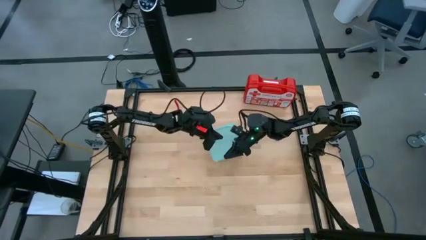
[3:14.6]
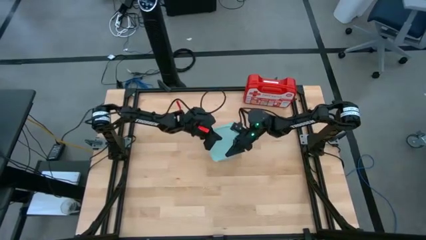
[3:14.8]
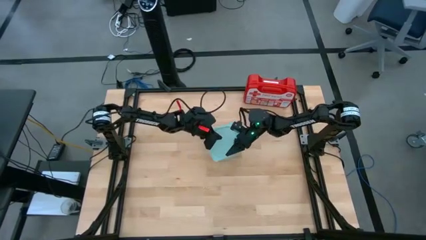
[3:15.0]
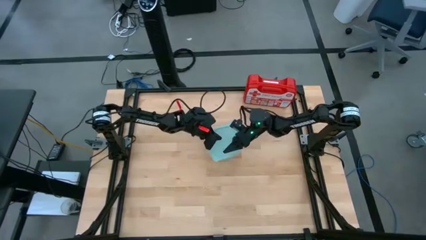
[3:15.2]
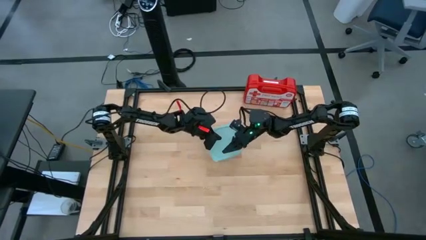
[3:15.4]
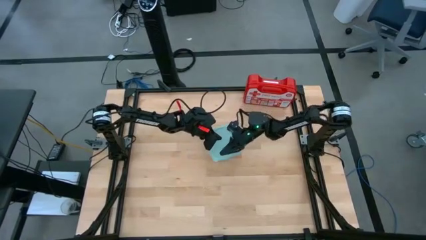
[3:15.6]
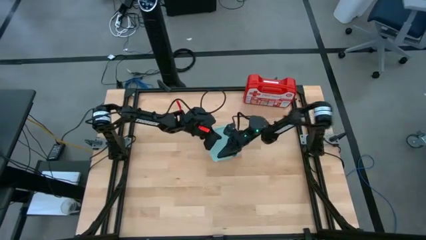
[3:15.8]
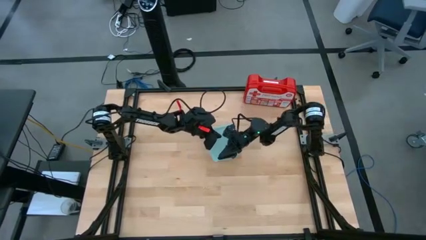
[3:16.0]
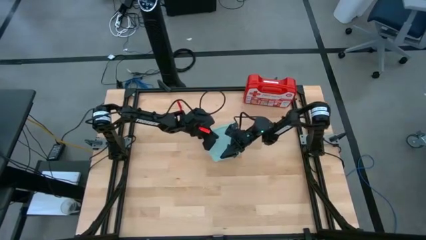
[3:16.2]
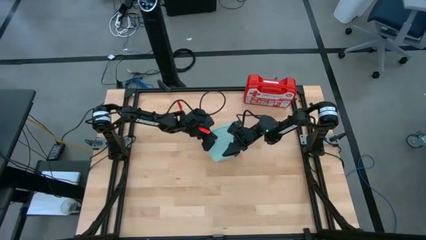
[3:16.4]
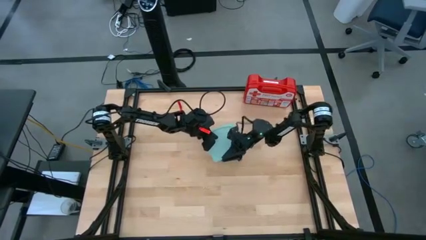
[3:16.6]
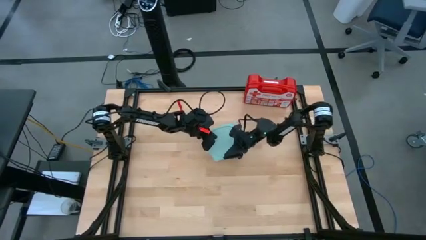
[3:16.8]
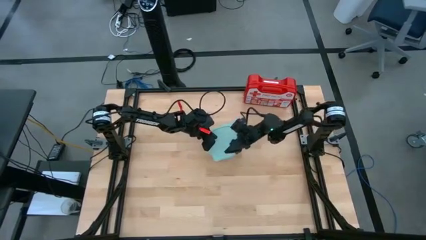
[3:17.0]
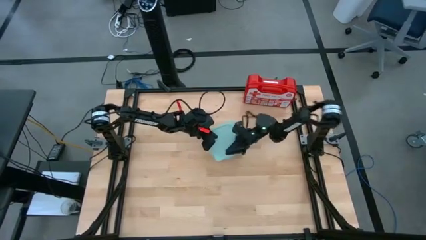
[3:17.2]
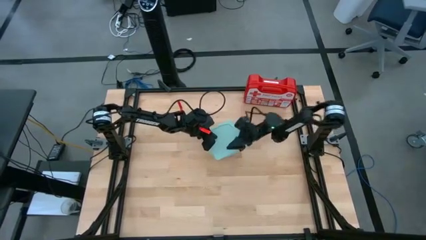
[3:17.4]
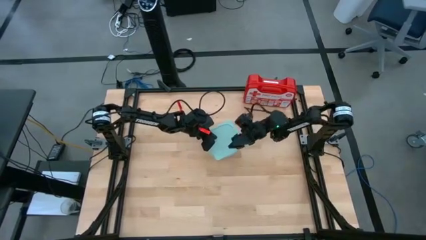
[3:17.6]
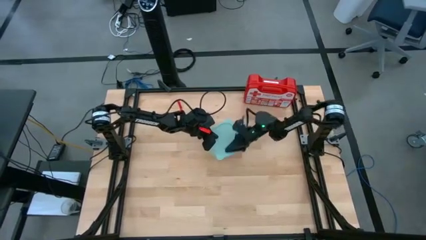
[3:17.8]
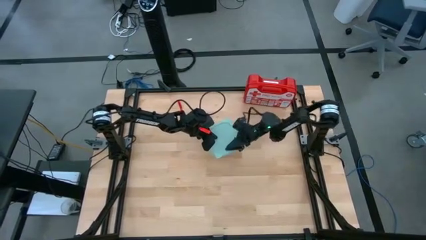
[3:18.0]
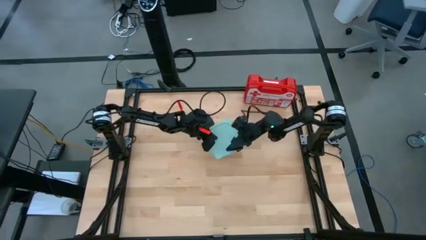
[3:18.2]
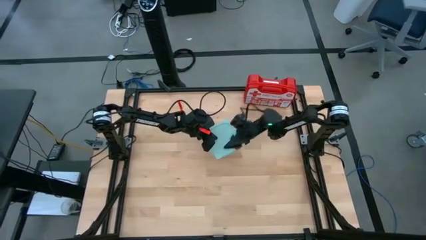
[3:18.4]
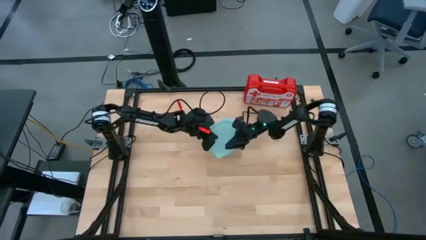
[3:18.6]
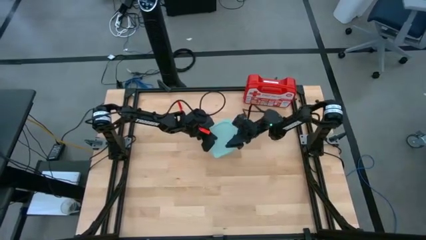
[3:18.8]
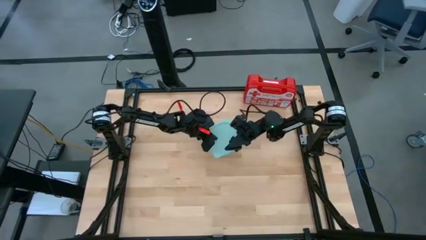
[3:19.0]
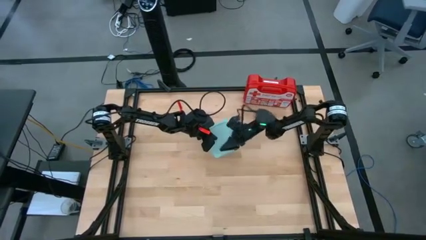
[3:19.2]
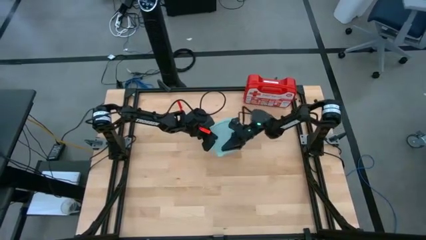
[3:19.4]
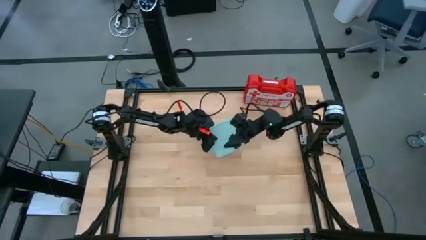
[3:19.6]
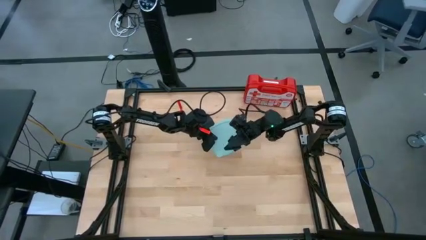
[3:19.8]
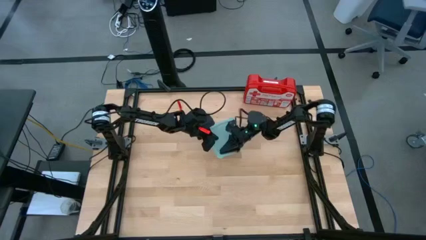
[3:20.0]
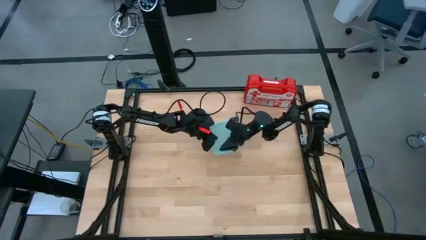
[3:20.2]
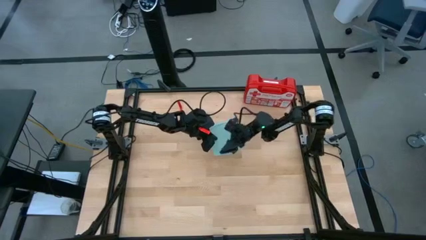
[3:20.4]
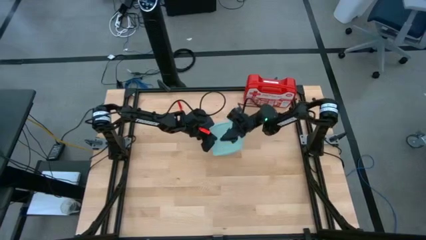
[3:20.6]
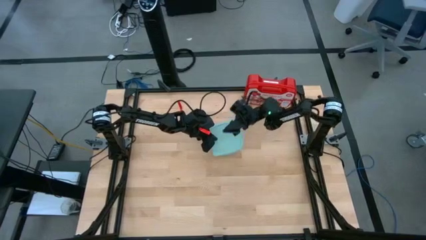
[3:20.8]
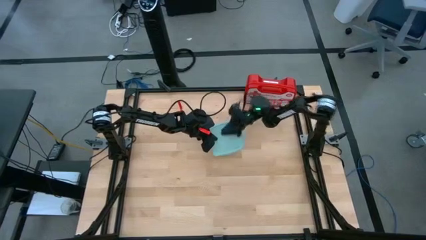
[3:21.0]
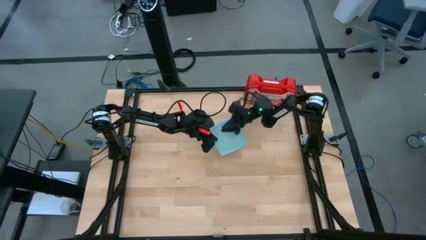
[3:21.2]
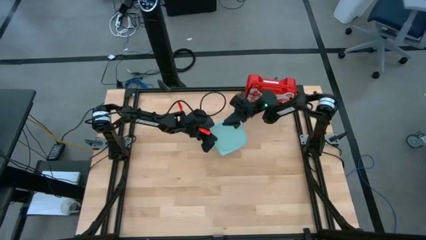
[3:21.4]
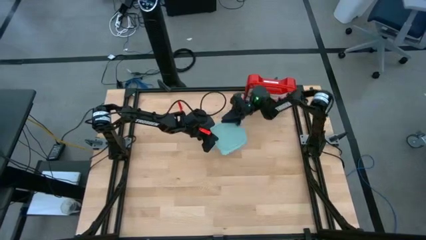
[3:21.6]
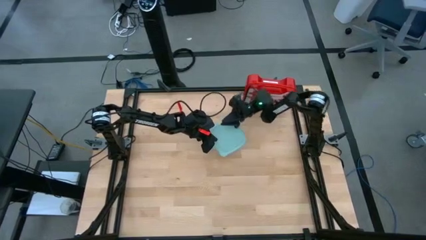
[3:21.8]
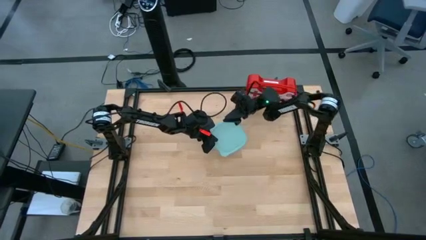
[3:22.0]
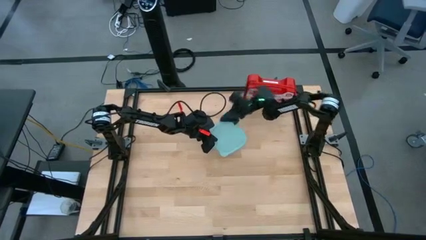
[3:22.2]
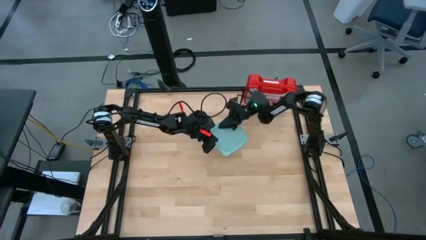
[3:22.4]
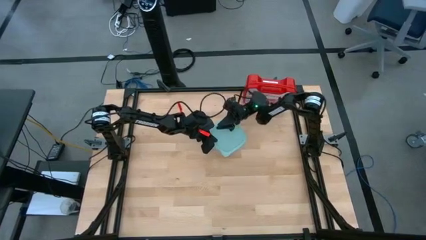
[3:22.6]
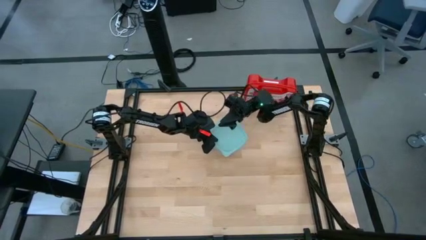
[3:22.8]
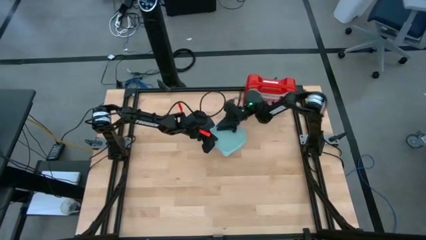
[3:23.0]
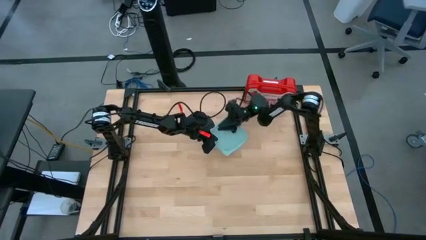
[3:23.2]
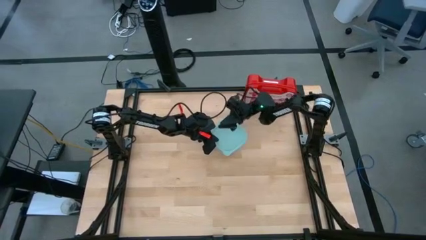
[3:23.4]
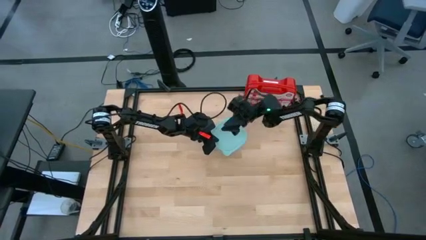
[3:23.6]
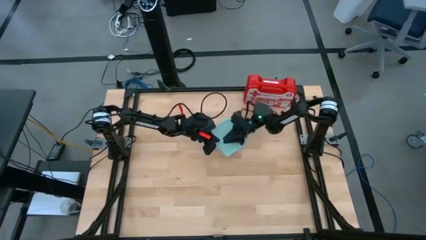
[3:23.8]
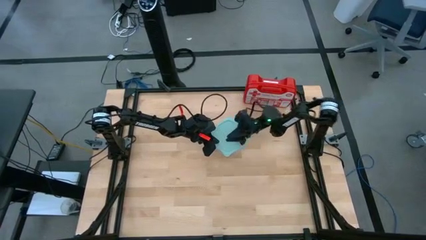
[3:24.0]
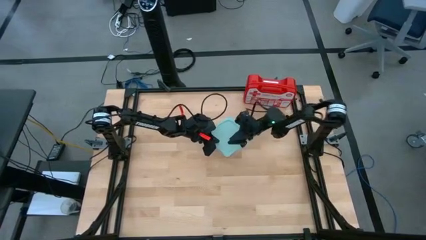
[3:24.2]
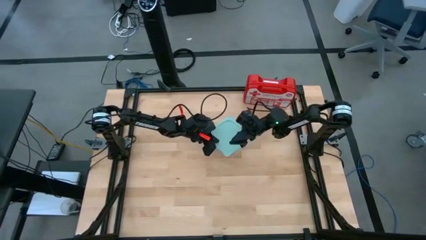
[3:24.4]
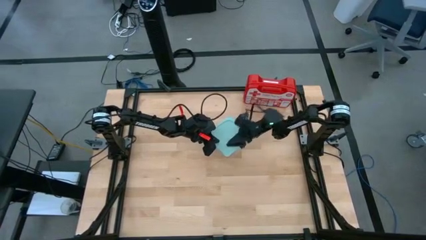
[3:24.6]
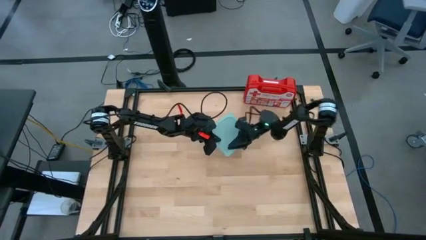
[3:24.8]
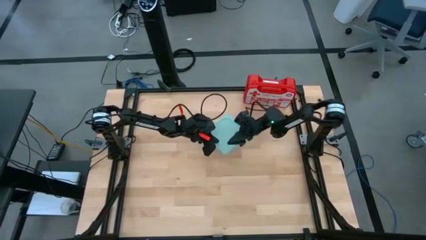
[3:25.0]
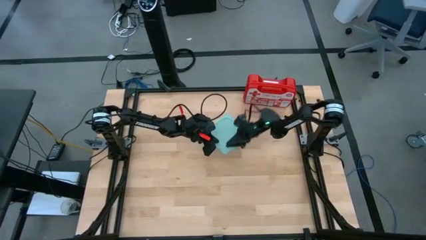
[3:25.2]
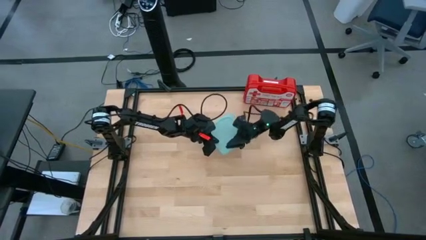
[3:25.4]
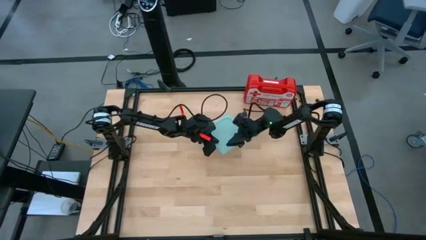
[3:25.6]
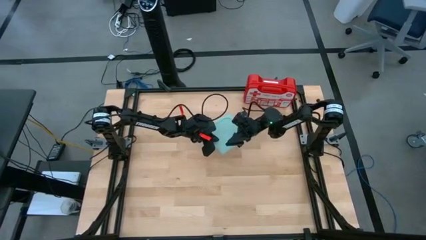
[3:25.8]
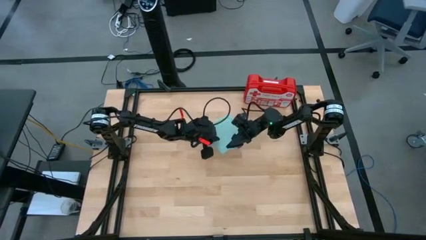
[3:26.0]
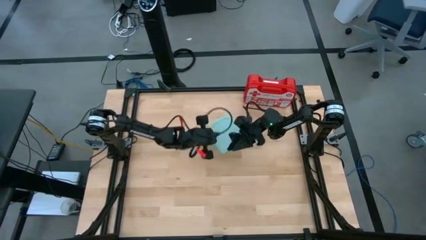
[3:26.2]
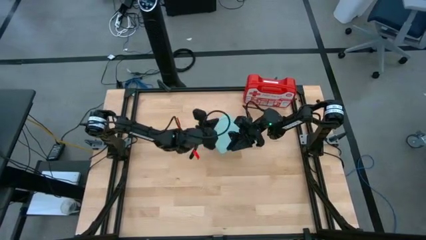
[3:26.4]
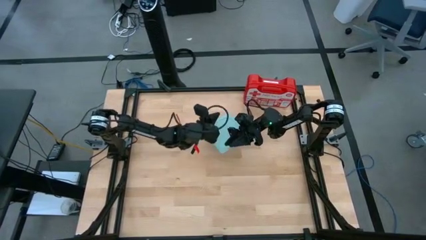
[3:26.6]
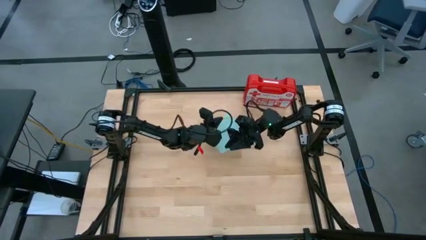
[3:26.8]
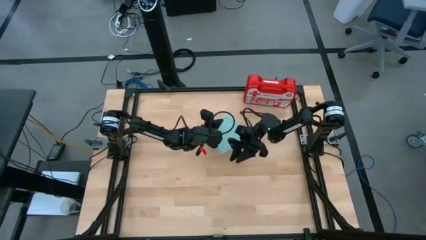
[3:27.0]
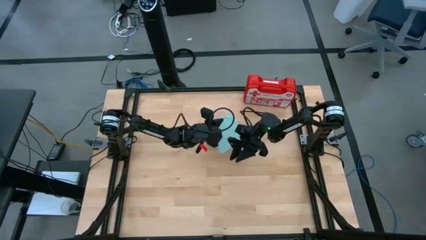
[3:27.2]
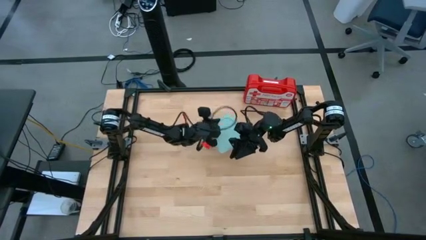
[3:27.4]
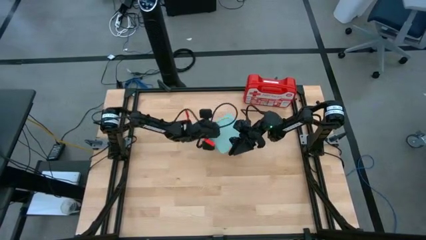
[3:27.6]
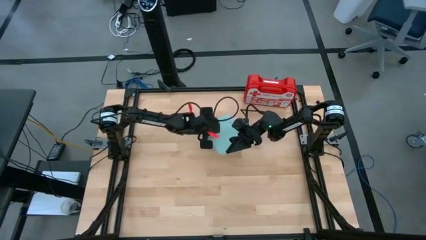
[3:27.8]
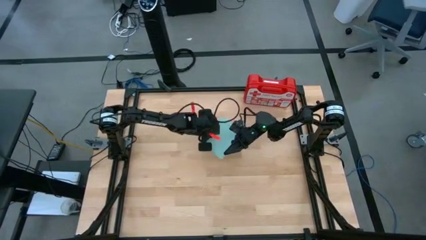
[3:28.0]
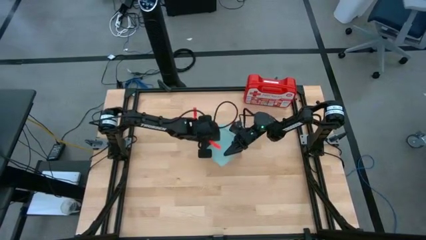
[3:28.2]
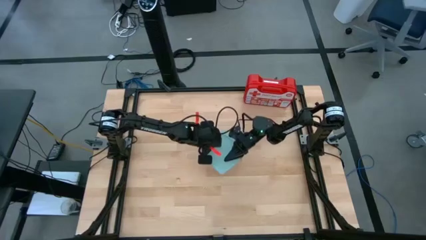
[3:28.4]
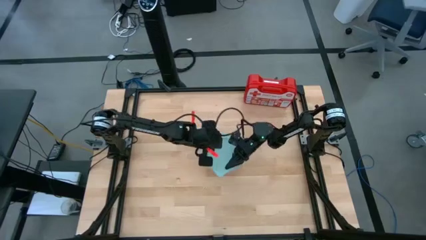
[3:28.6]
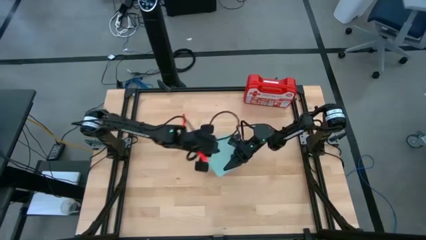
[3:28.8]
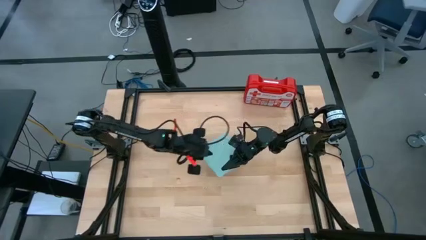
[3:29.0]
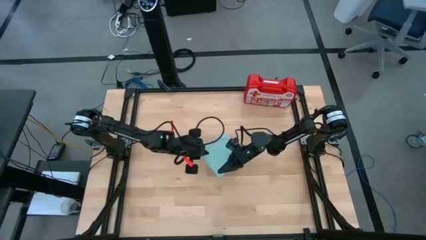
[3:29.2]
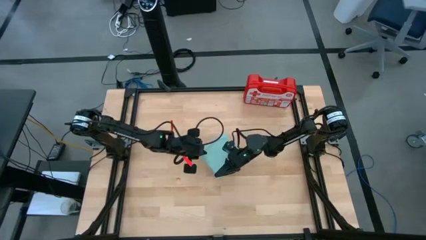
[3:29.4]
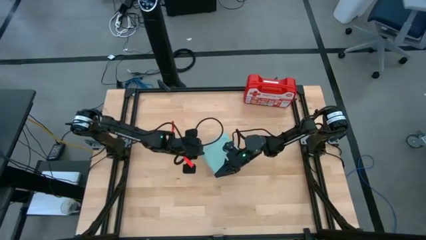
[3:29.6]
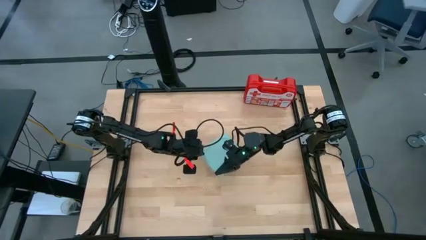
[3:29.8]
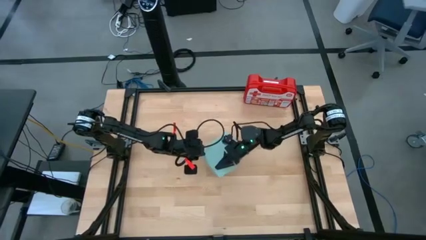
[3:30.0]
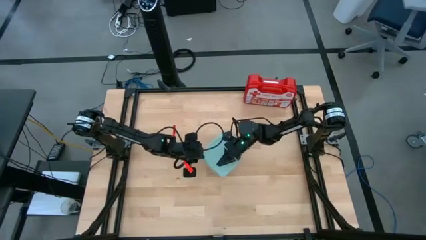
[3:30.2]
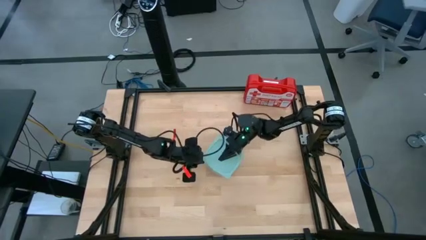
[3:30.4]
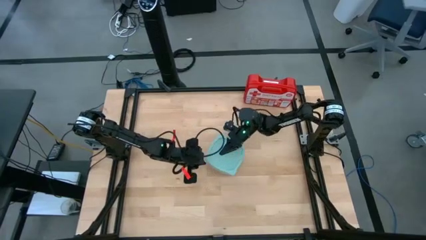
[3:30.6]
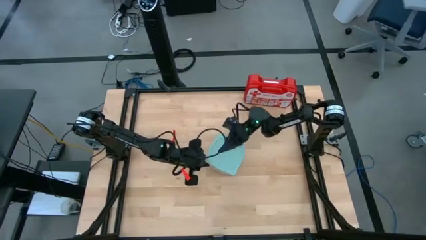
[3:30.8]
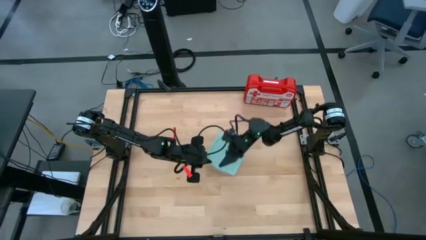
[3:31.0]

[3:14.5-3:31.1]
Task: Roll bandage
Close the transparent food container lid
